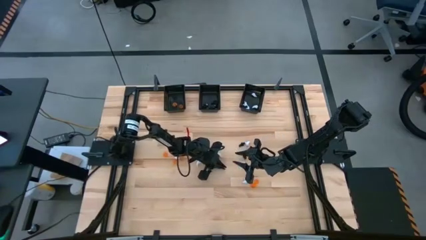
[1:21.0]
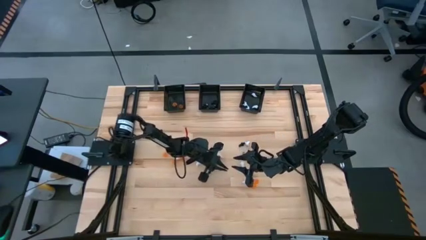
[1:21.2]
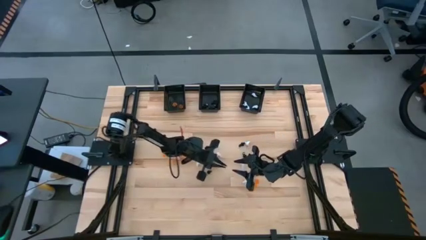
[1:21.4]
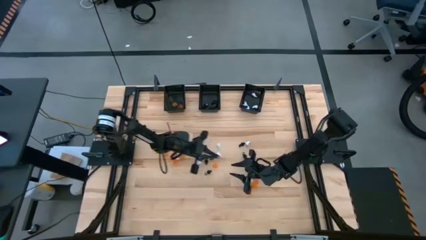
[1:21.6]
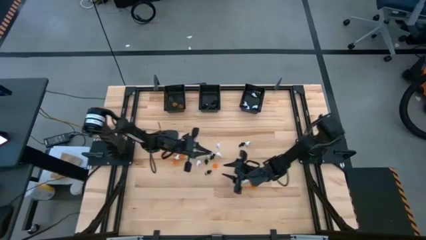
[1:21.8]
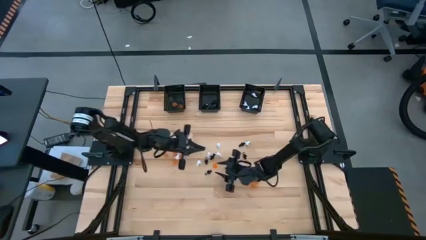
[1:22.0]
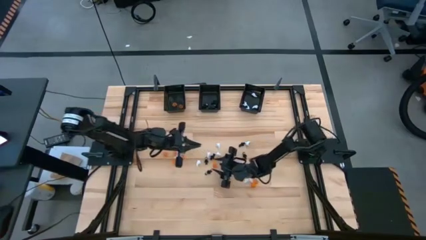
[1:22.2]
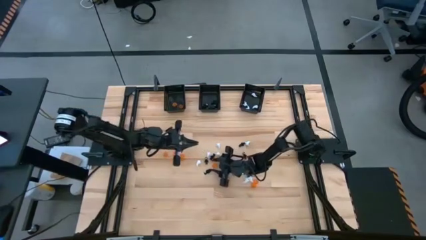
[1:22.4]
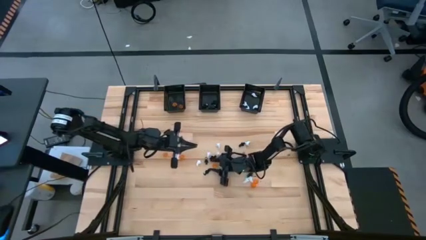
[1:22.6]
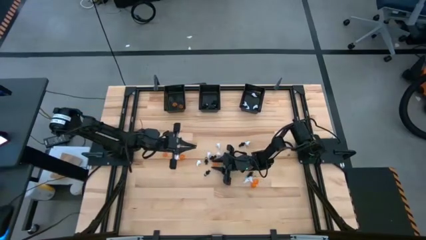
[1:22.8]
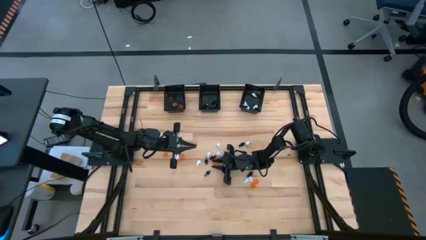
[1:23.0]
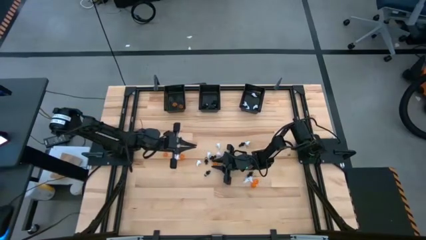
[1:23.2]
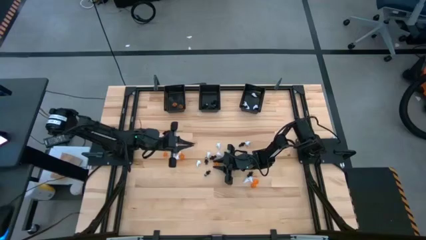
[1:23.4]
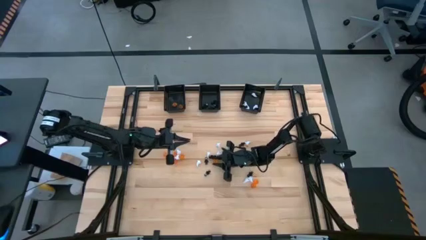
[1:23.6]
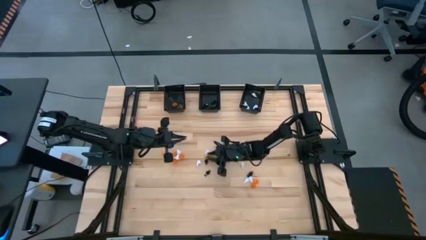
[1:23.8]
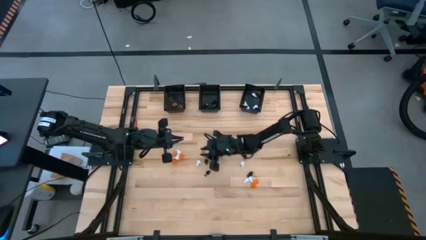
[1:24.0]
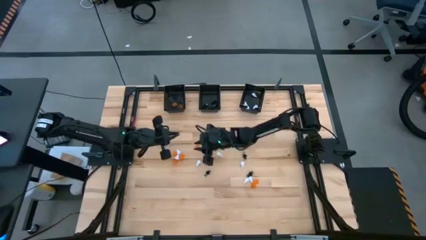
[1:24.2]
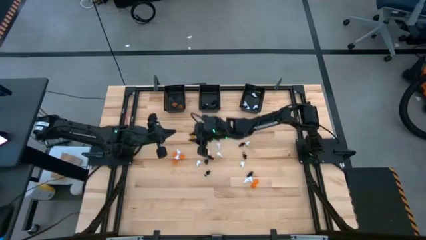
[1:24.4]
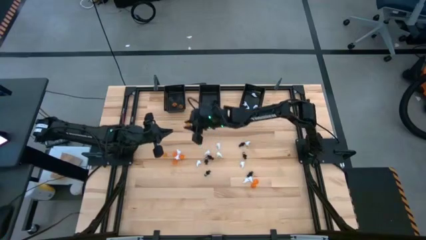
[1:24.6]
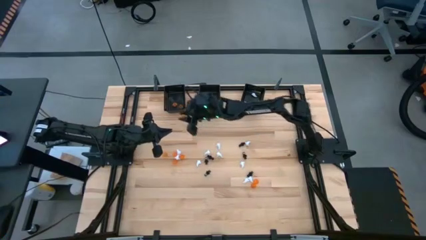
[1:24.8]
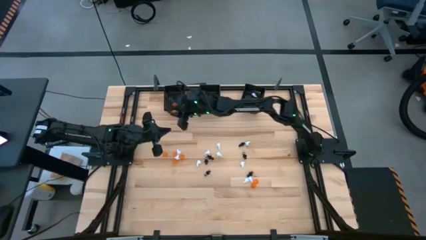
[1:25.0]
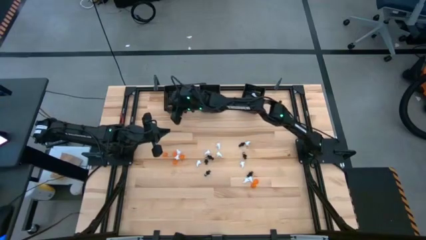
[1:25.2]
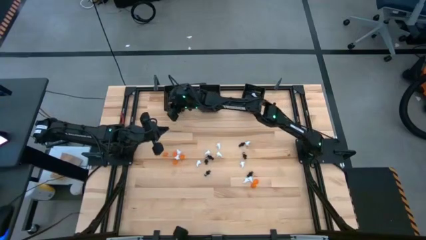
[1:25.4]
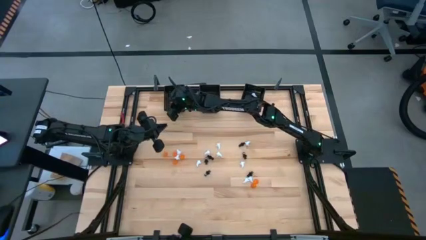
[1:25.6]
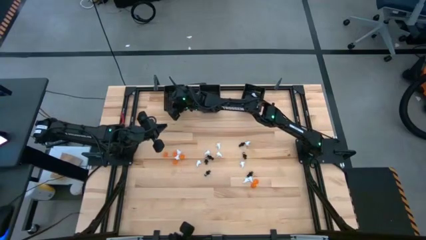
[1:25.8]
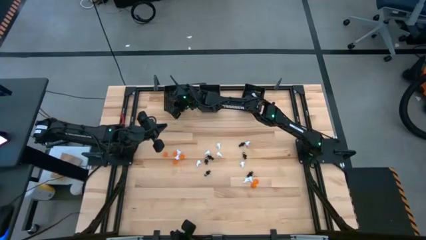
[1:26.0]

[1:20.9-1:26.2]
Task: Sort Halloween decoration
Put the orange pumpkin toy into the left black basket

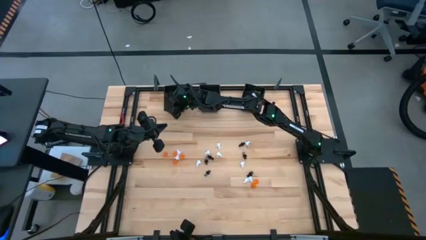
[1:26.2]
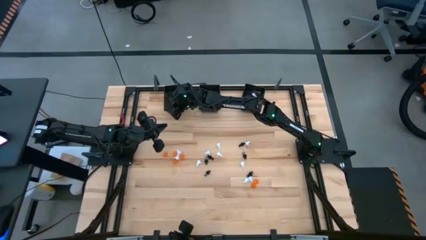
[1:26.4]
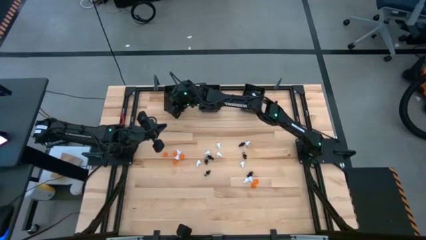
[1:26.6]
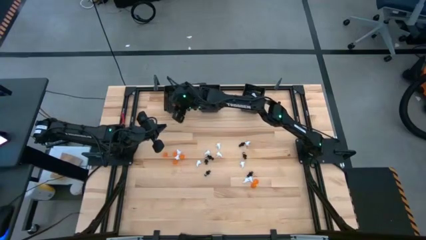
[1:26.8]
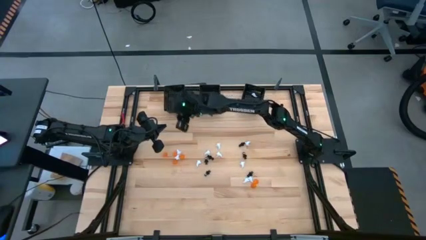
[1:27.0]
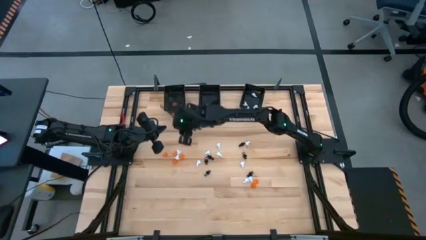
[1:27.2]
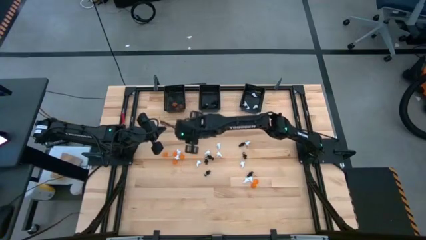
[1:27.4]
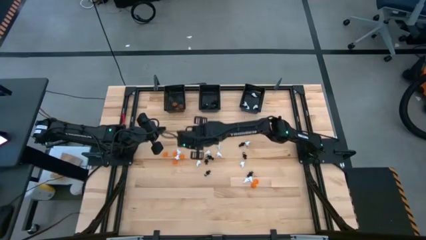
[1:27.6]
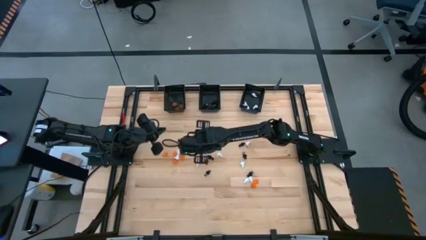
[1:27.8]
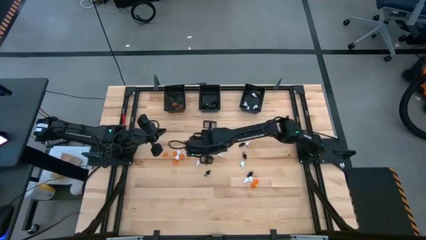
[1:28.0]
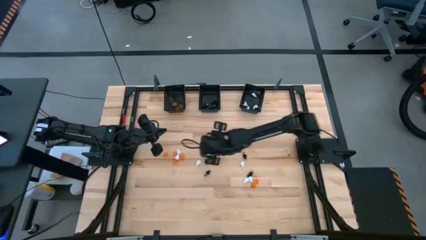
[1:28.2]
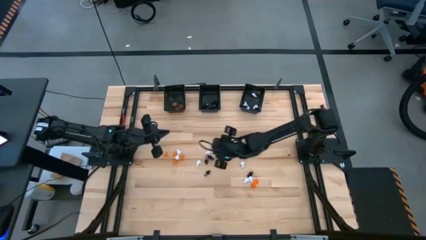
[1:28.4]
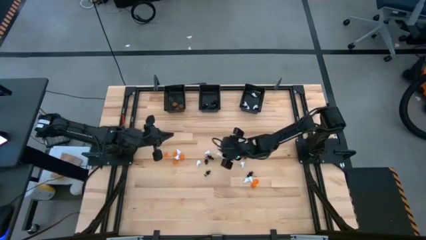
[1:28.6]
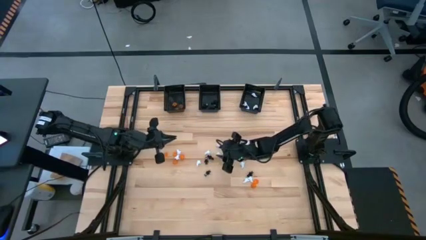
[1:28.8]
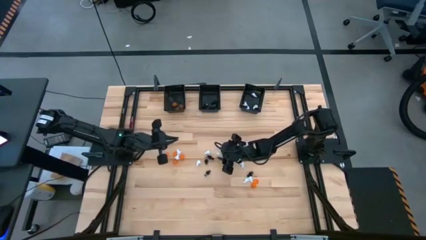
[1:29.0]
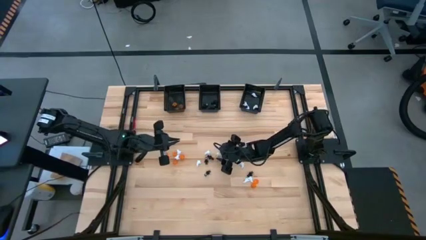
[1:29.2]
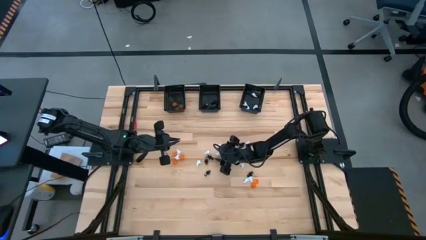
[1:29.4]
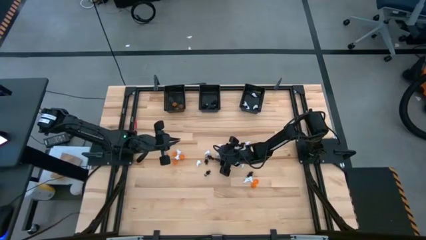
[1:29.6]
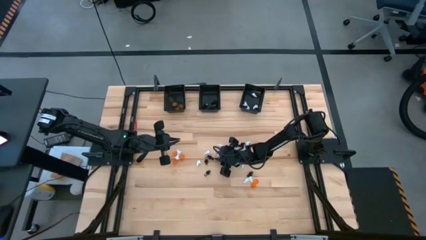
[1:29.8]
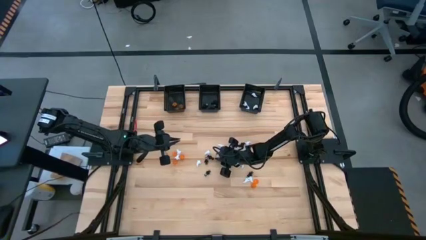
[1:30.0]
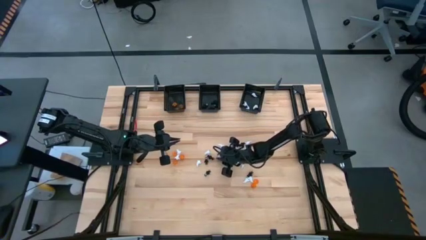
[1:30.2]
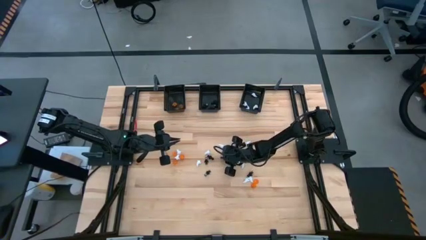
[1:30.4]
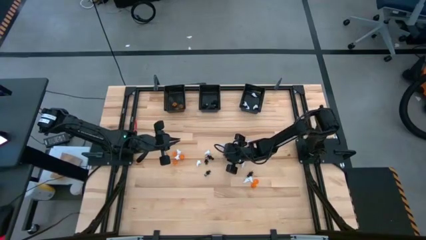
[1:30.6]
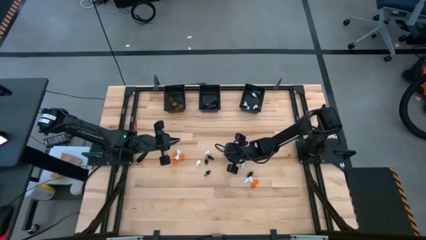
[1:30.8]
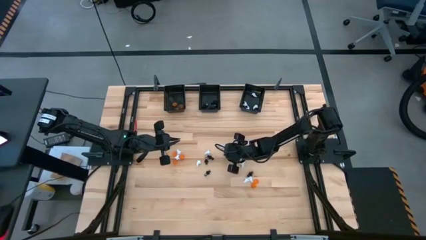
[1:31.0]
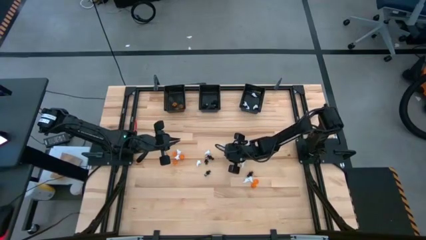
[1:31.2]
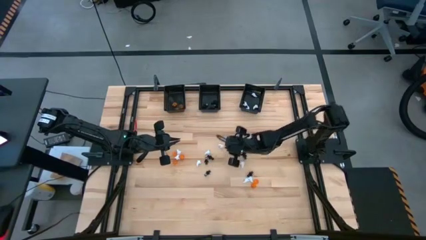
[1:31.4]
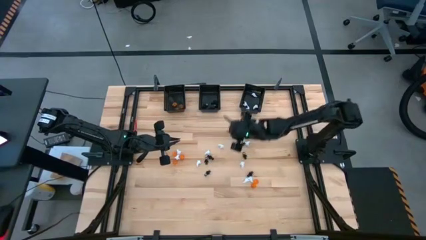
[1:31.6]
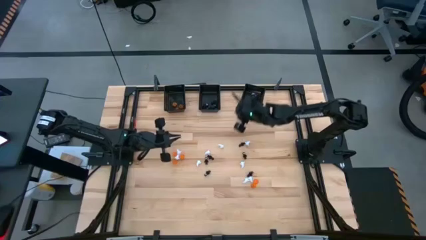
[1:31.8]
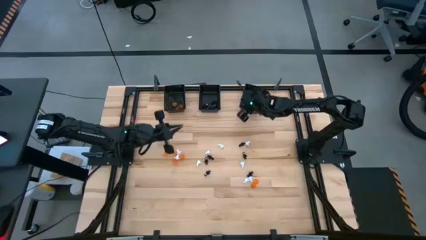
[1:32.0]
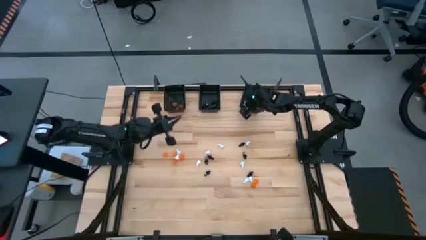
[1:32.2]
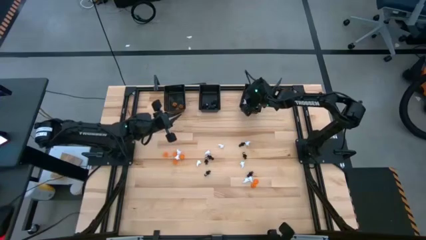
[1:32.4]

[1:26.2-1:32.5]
Put the white ghost toy into the right black basket

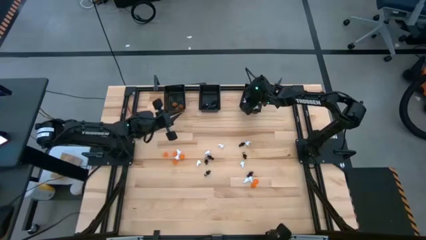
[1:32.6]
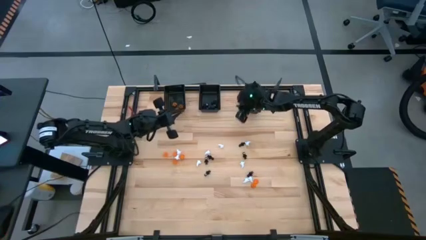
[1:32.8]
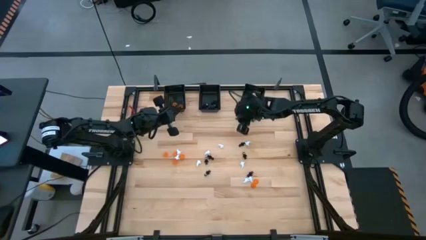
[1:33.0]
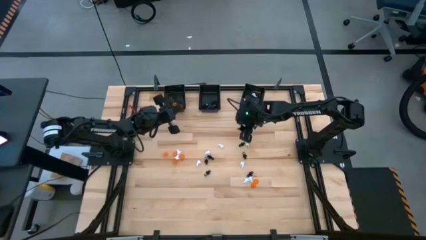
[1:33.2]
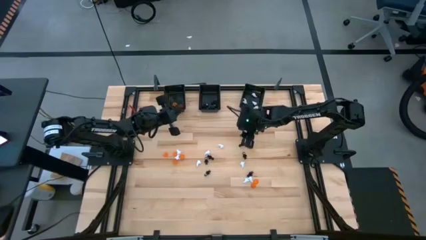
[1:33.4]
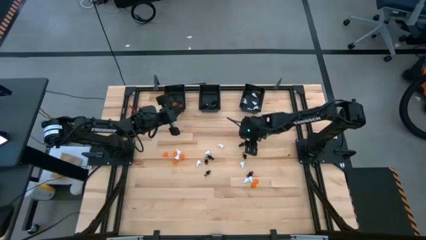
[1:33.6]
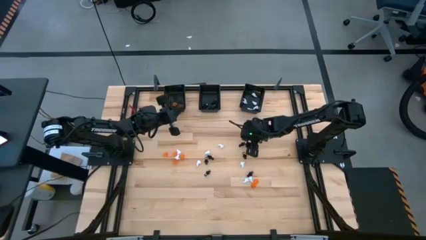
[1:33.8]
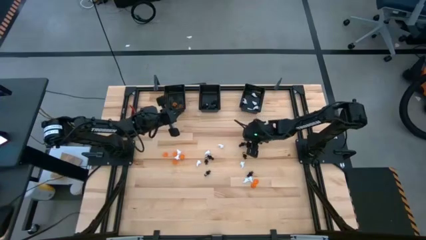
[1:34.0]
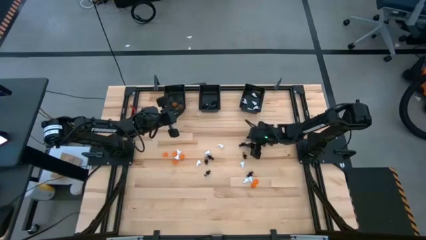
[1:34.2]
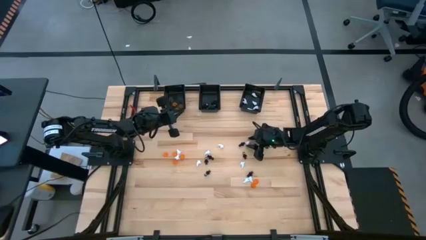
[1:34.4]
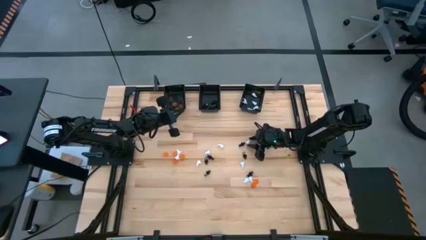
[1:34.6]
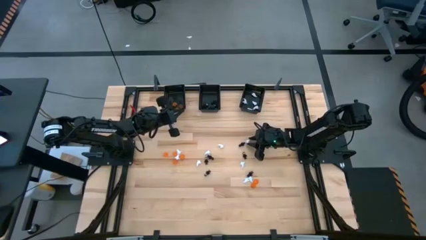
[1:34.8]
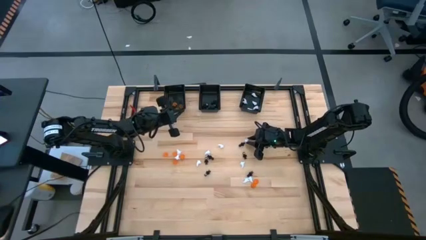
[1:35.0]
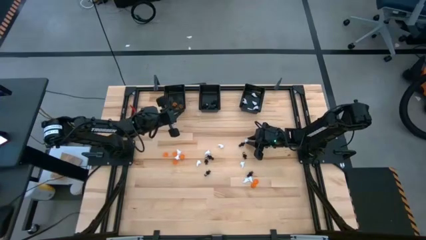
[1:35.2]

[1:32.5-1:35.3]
Put the white ghost toy into the right black basket

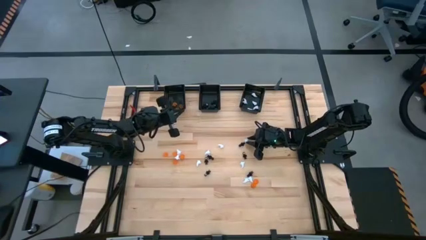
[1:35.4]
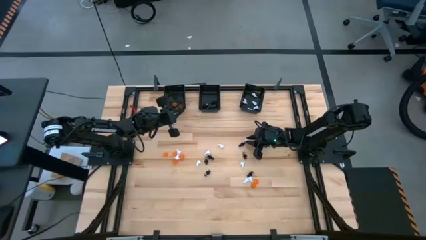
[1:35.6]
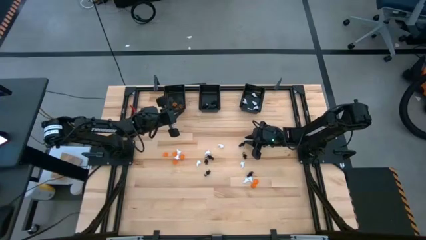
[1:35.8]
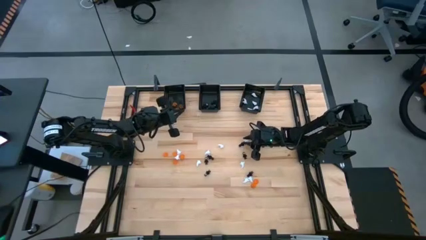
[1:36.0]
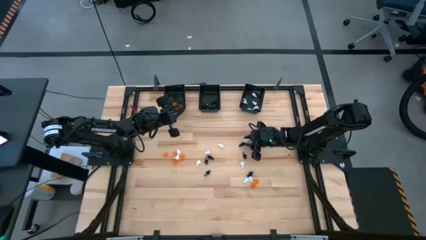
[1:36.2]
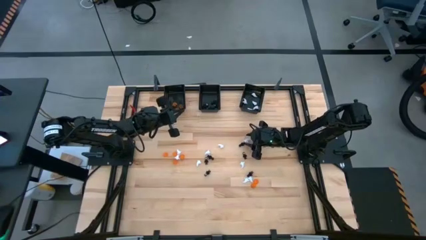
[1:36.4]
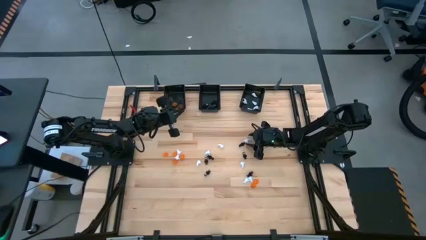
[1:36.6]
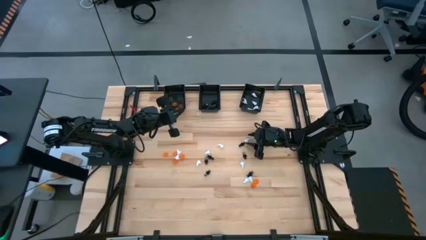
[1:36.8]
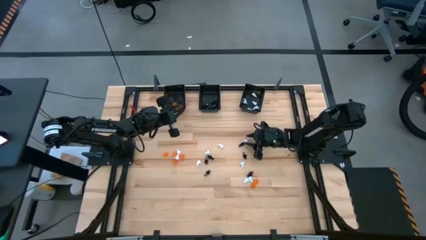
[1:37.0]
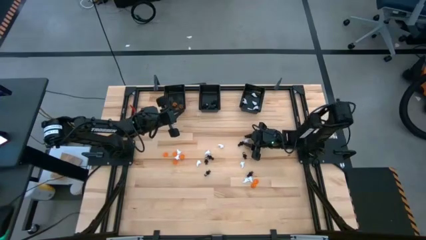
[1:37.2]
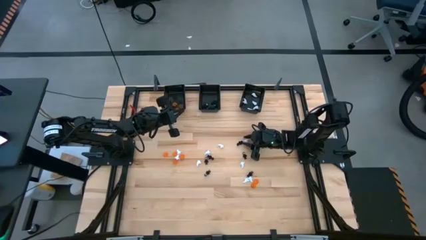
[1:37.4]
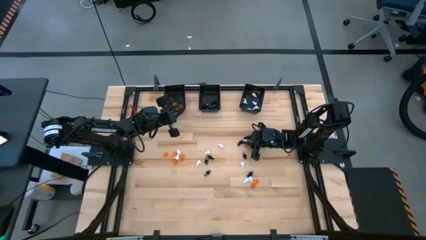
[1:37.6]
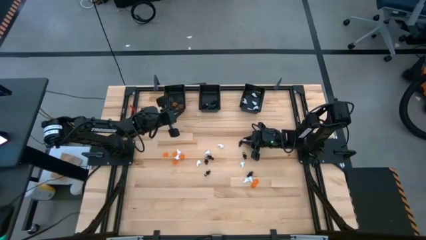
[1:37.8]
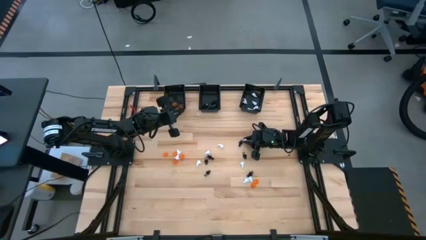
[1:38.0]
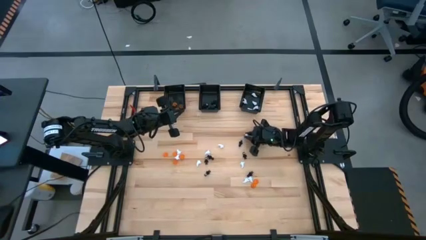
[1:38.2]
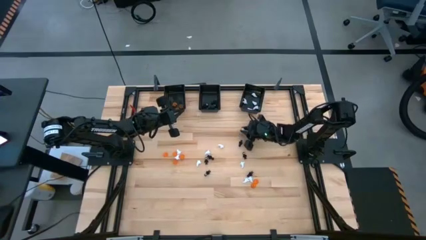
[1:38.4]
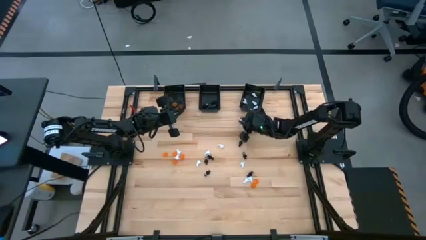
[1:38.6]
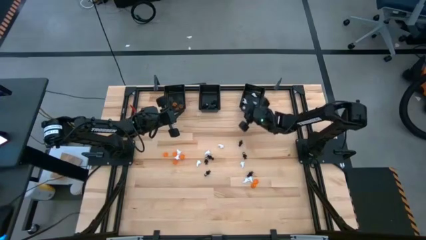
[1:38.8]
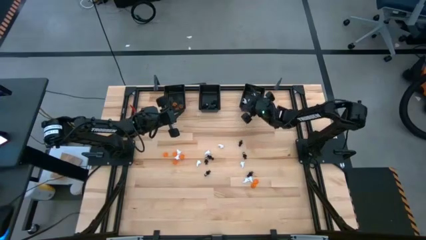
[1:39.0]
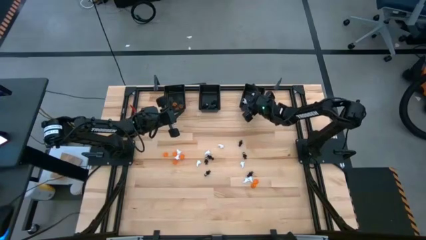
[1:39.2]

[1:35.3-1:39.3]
Put the white ghost toy into the right black basket
